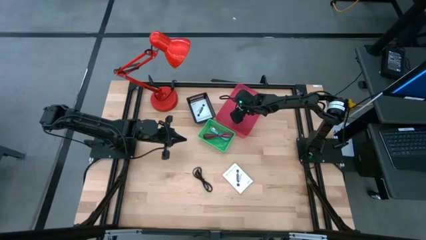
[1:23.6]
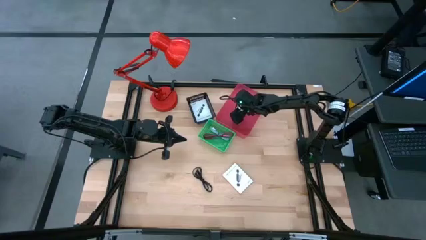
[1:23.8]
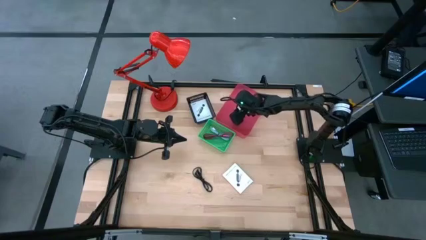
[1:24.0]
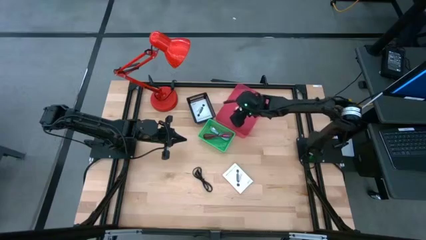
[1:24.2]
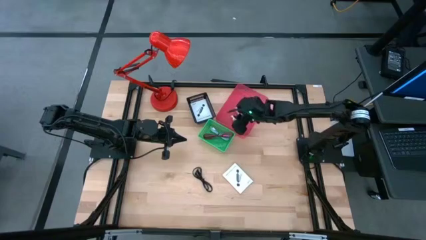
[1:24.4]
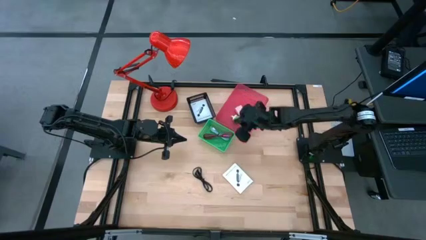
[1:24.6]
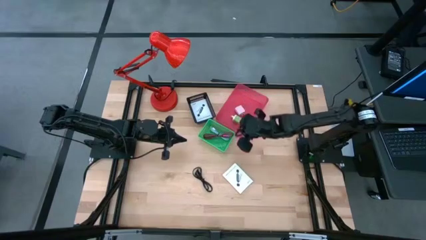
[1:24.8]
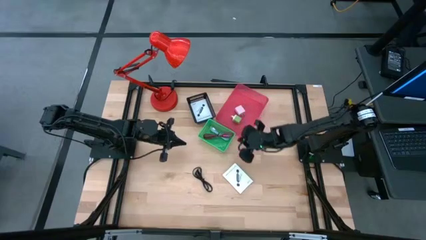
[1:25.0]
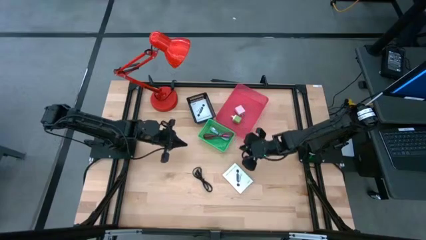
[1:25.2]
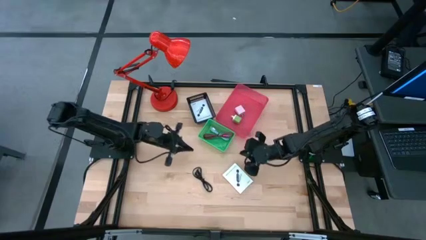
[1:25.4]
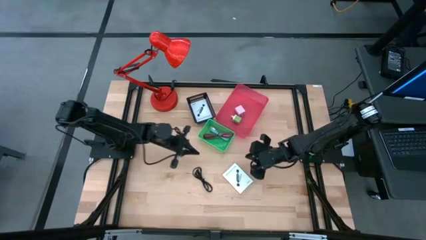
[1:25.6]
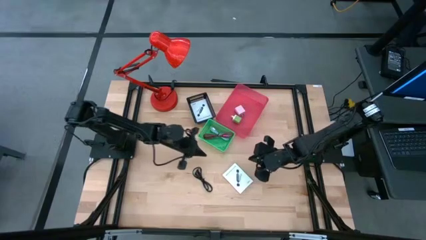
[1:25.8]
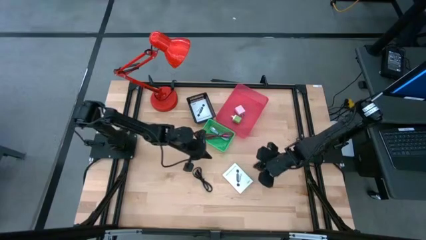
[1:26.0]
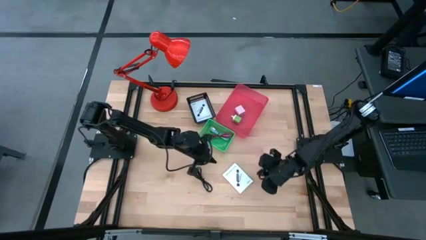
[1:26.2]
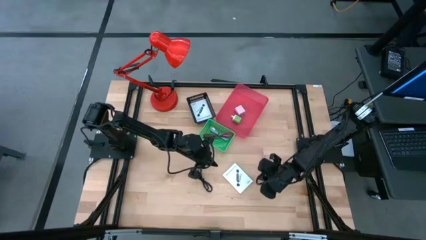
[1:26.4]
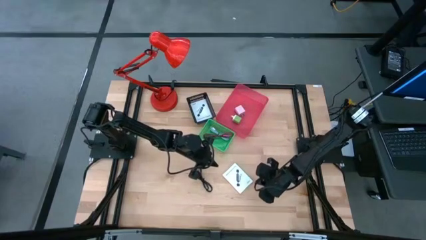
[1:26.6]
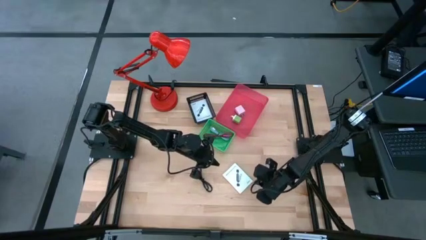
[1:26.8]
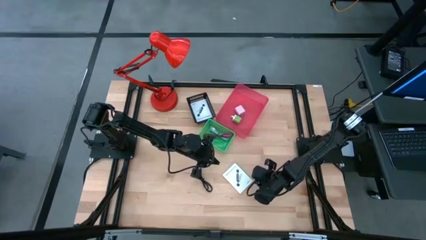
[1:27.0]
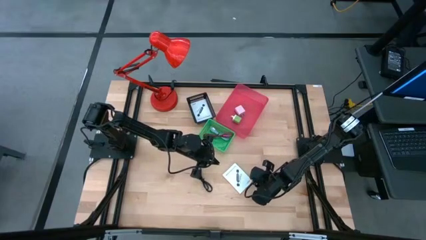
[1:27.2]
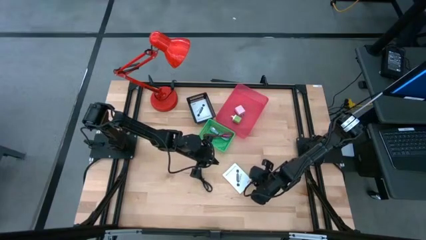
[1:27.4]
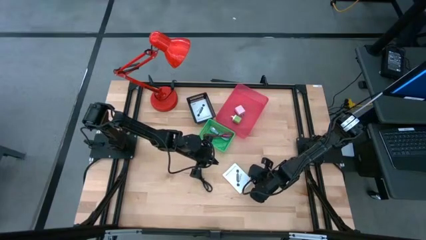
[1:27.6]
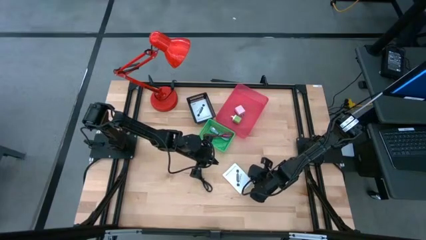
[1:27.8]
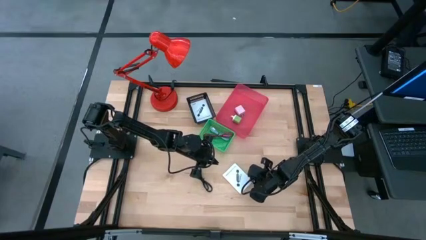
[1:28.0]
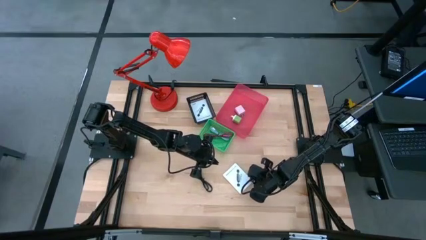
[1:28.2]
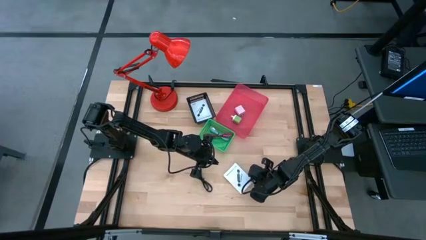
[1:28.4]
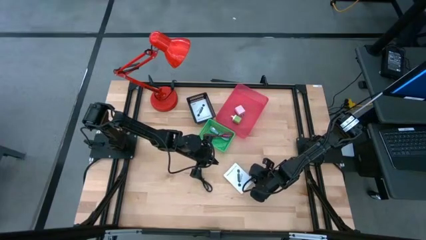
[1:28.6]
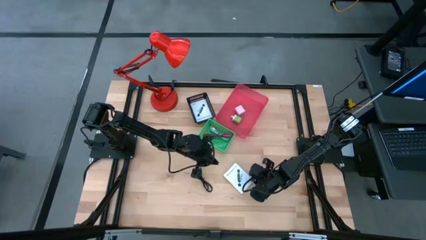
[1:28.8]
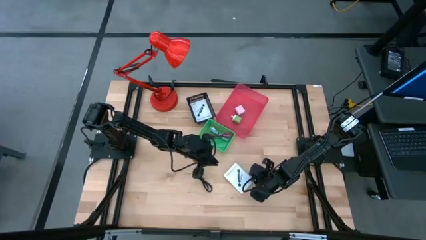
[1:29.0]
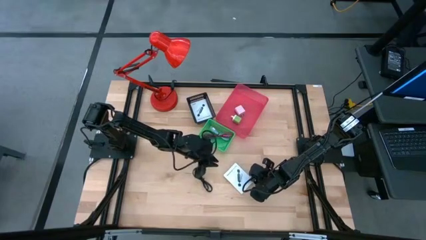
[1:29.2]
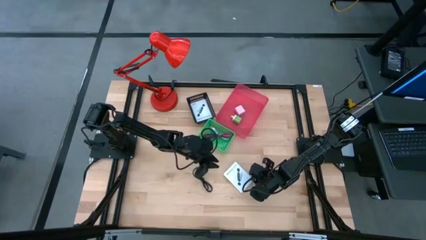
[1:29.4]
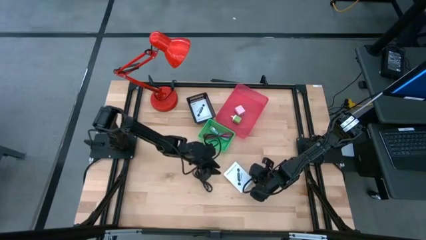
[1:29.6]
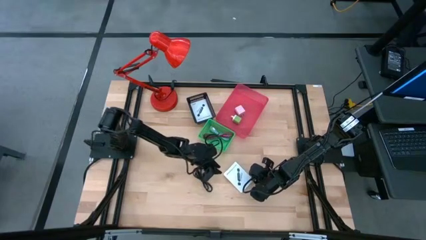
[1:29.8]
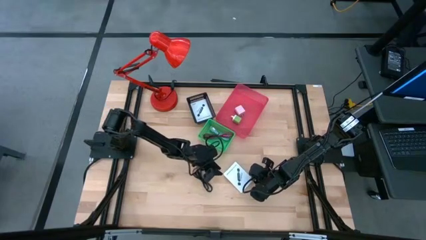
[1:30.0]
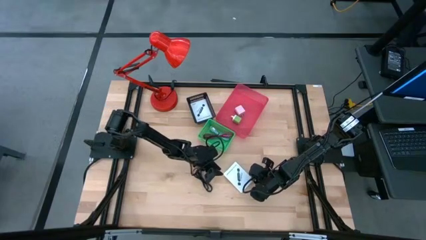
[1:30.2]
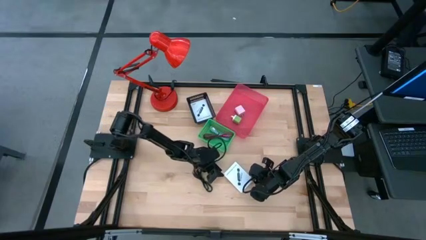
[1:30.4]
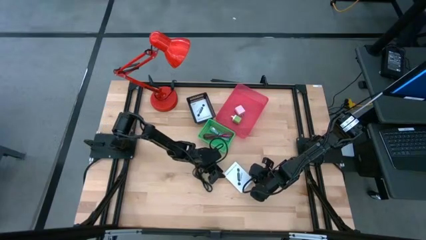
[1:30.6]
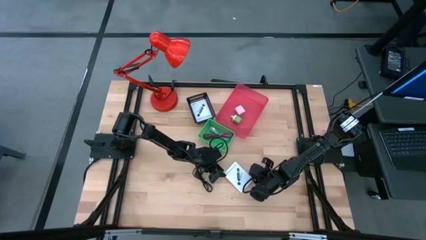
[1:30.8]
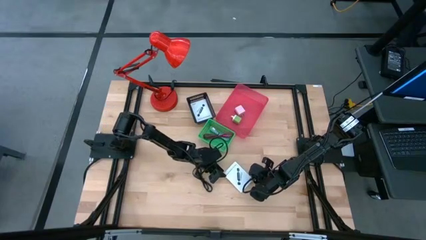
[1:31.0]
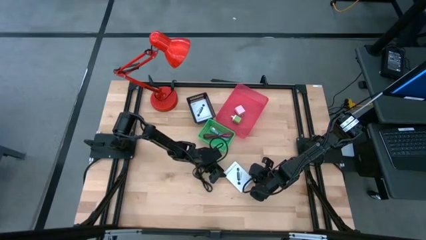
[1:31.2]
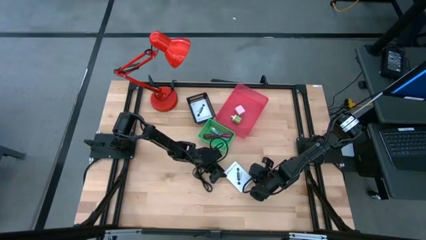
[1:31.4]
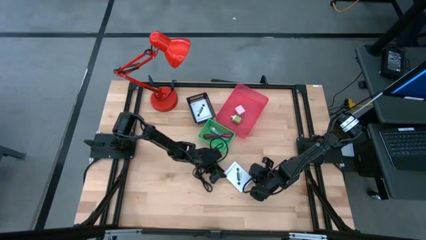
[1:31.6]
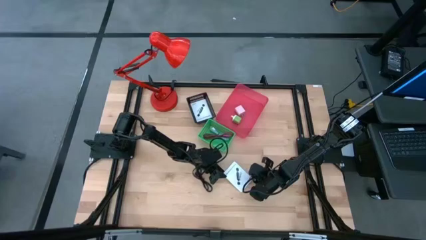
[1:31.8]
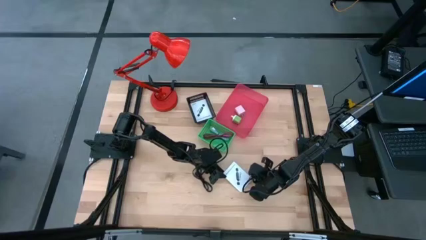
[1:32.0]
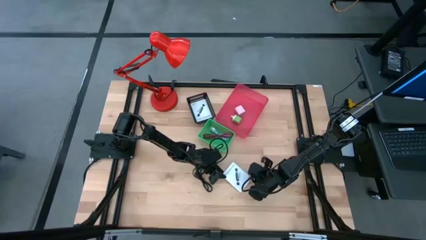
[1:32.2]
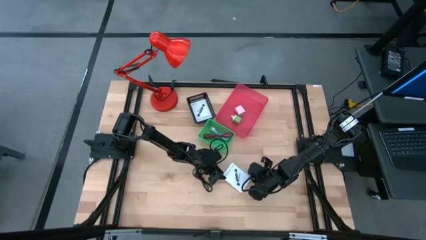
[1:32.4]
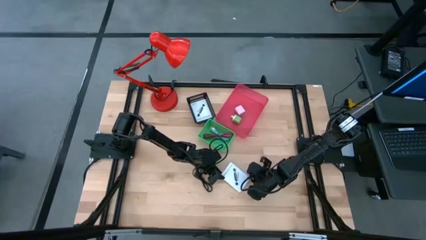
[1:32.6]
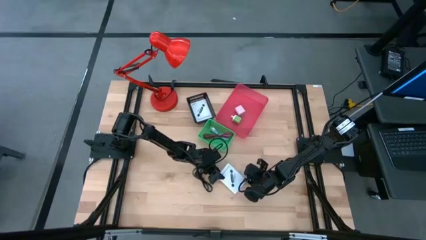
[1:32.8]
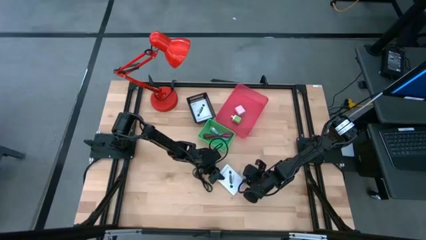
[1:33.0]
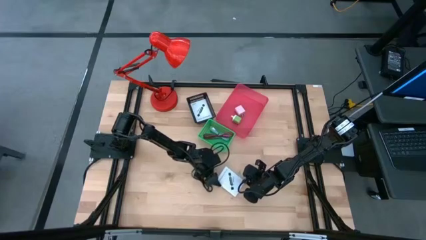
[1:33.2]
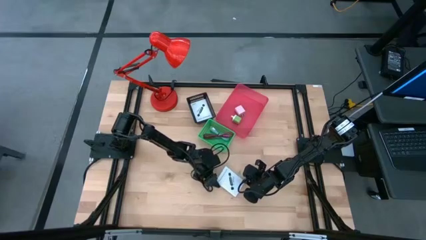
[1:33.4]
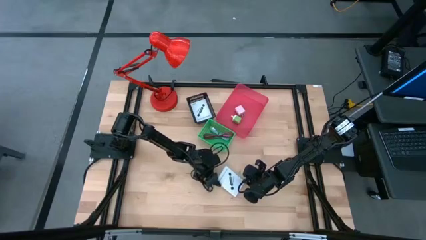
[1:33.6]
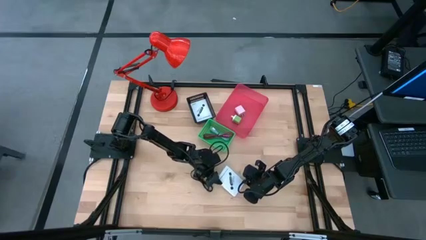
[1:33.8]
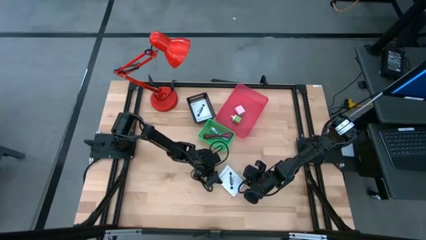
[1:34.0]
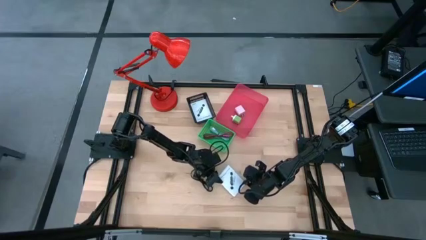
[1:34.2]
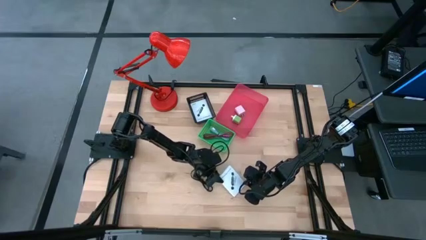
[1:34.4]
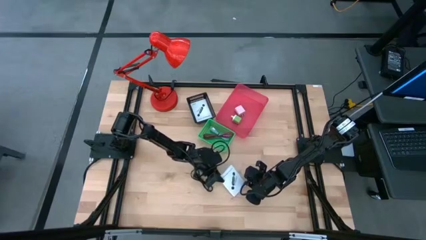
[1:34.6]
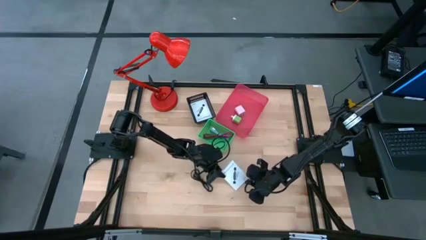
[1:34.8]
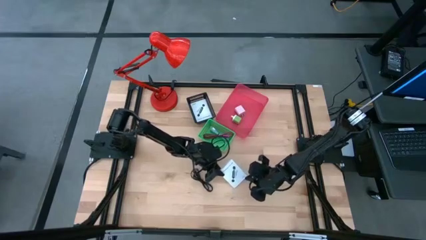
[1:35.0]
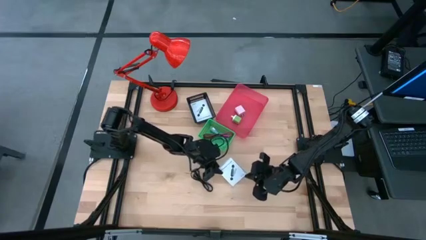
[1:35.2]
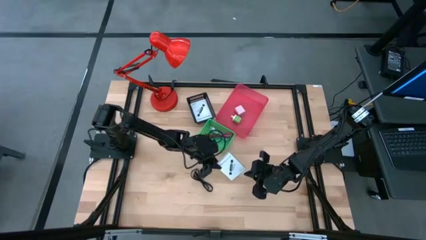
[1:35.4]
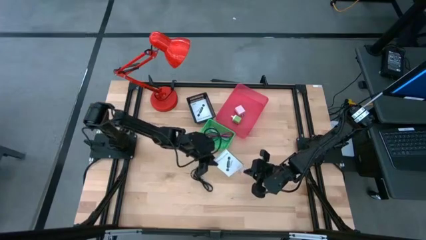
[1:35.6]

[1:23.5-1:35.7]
Task: Pick and place items into bin
Put the card reader box into the black bin

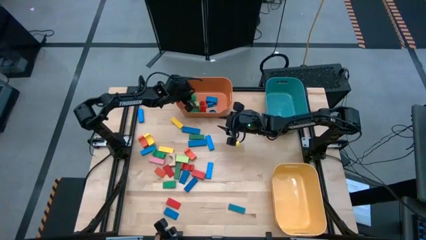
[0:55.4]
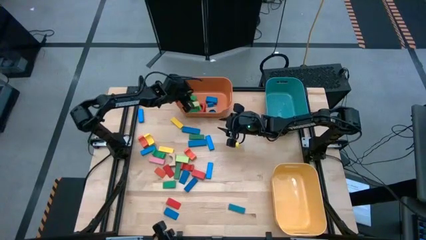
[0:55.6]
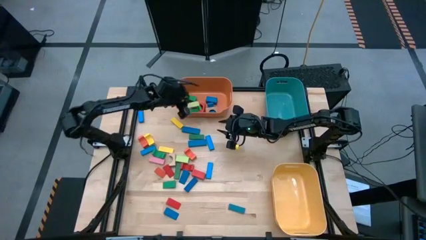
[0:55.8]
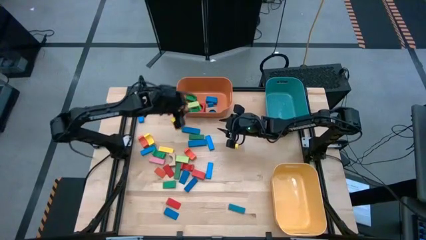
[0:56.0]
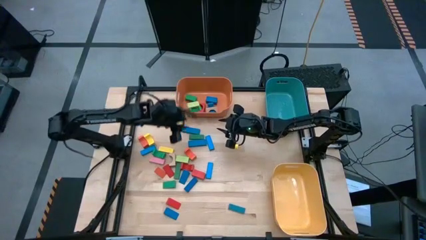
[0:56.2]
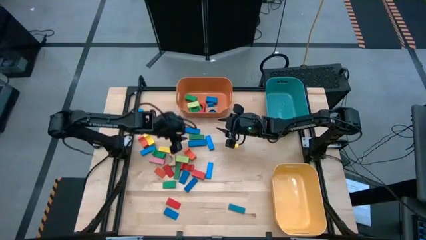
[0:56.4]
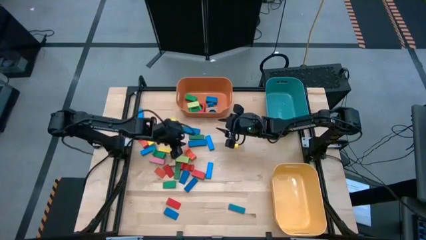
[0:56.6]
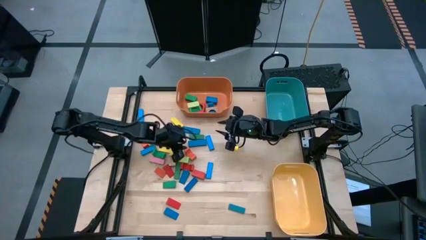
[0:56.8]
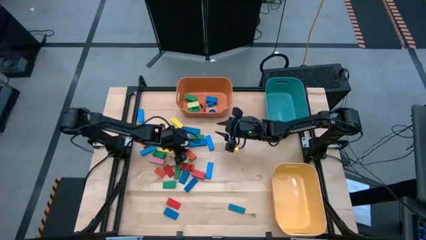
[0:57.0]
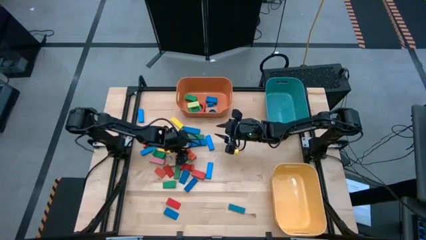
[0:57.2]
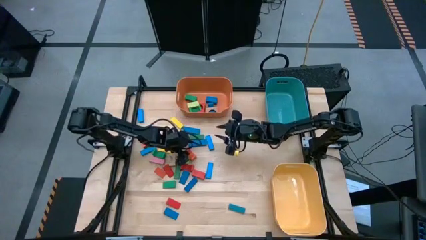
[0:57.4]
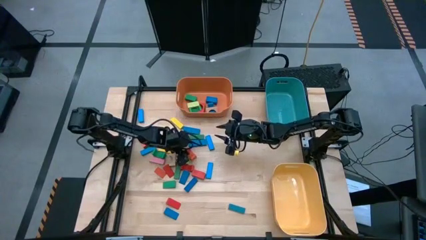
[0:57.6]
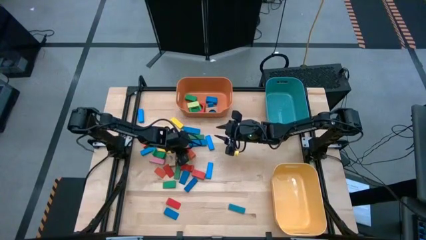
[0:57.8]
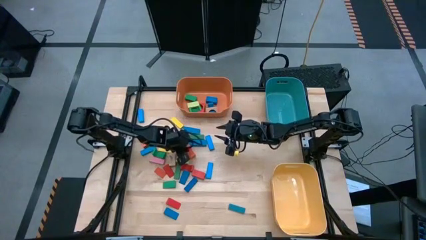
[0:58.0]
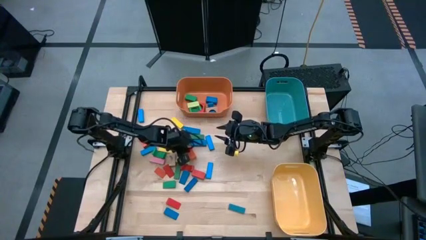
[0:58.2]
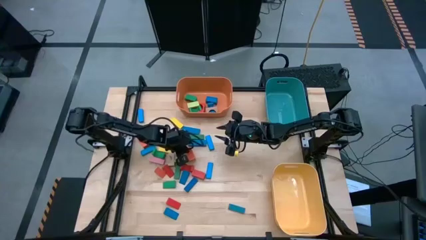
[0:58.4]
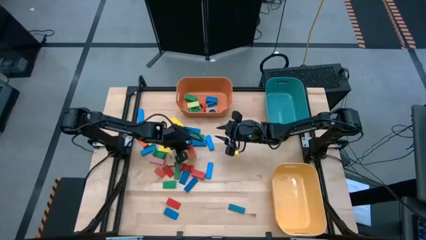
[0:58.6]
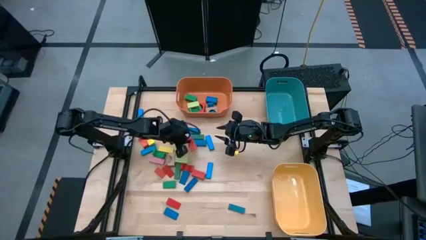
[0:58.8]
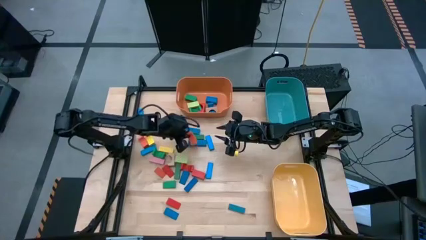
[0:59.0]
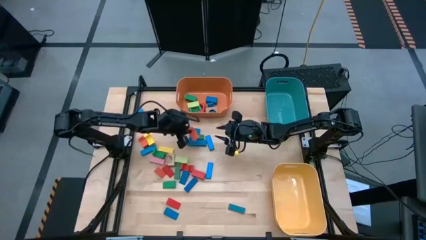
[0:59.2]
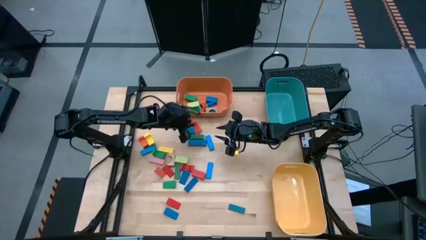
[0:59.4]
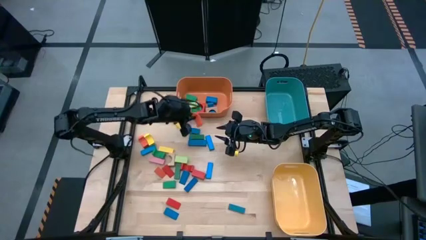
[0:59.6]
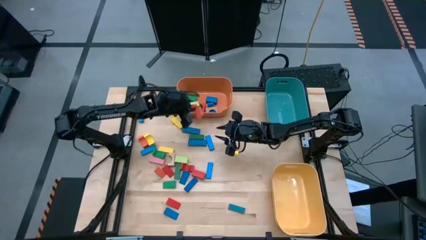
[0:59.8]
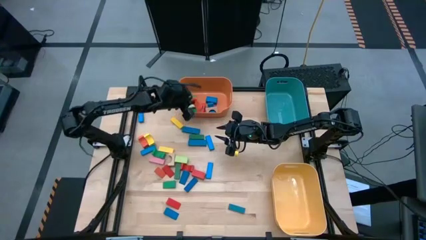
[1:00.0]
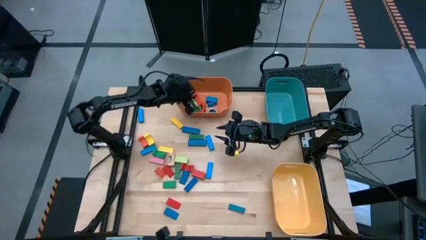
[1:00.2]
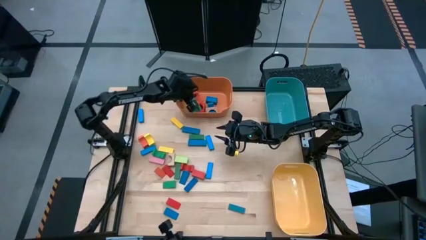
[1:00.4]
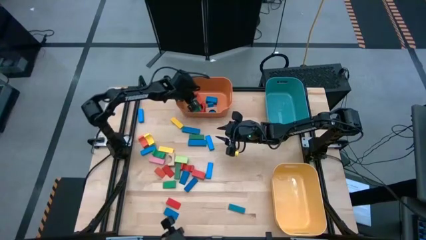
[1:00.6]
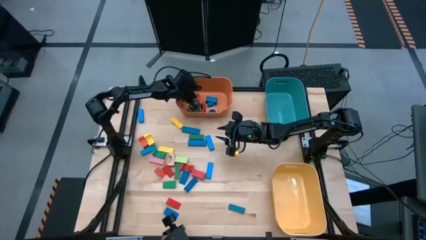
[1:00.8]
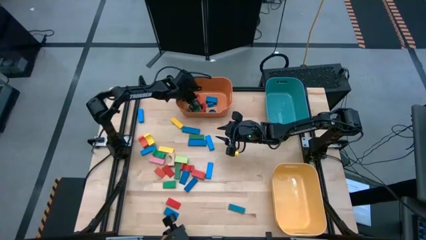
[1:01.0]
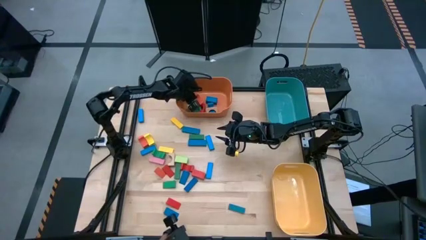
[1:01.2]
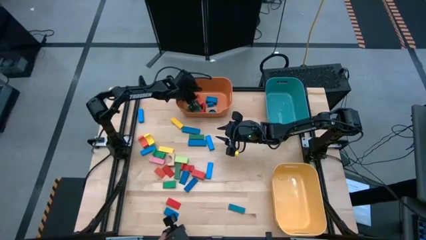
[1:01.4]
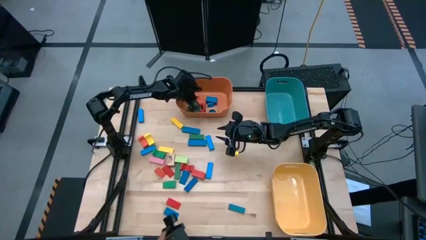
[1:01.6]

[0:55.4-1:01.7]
Task: Sort blocks by size
Put the orange arch block into the orange bin
